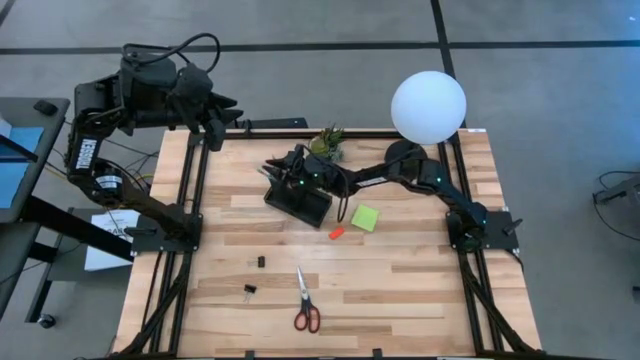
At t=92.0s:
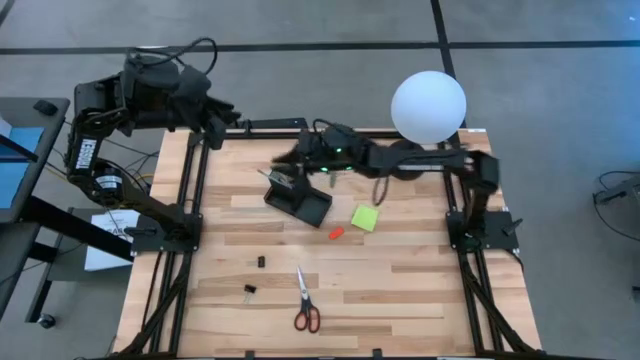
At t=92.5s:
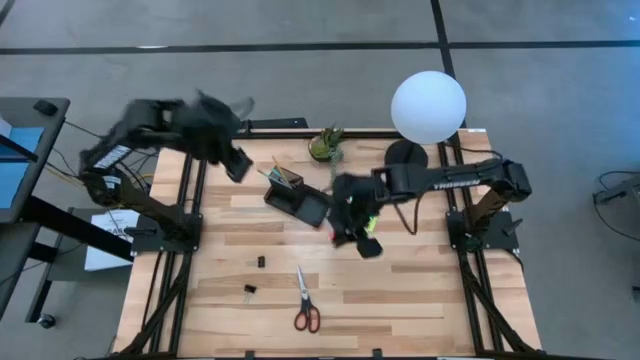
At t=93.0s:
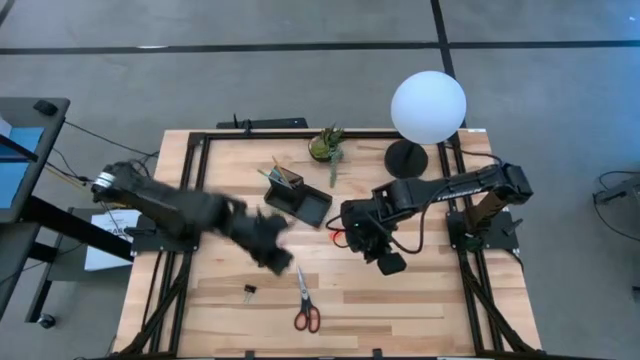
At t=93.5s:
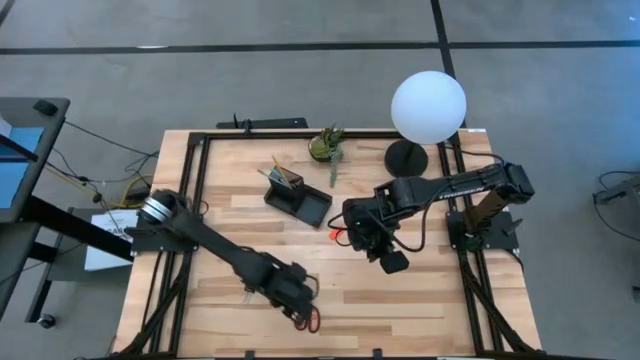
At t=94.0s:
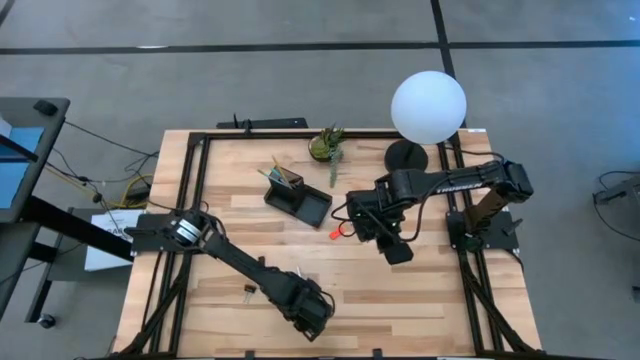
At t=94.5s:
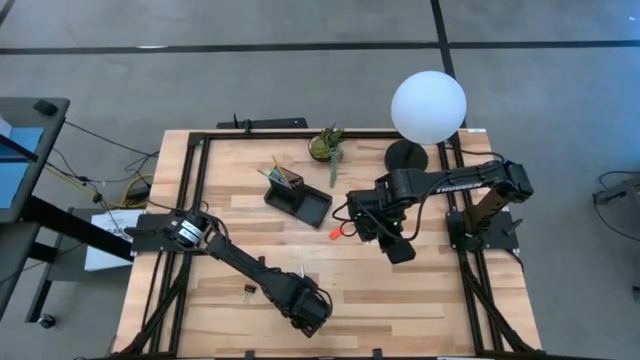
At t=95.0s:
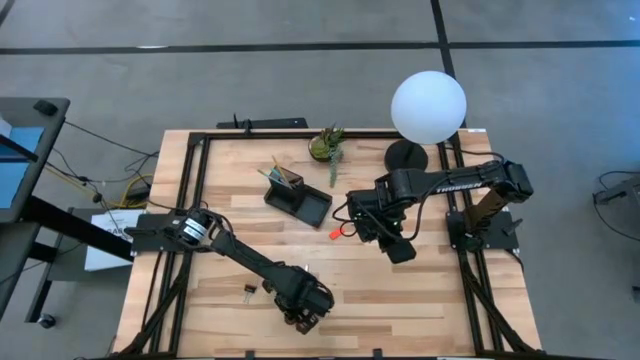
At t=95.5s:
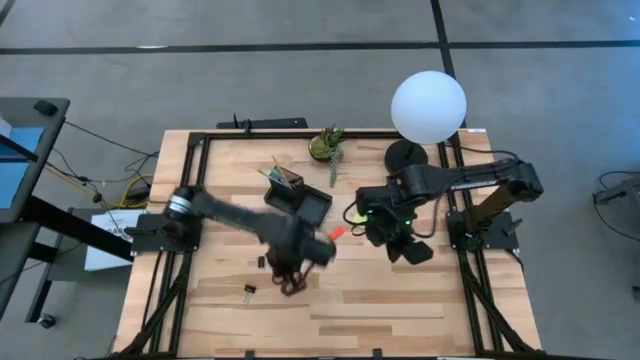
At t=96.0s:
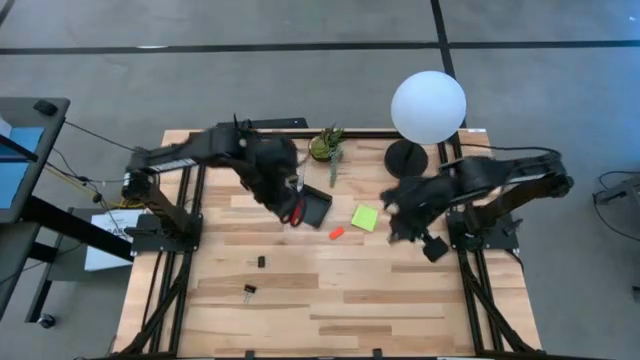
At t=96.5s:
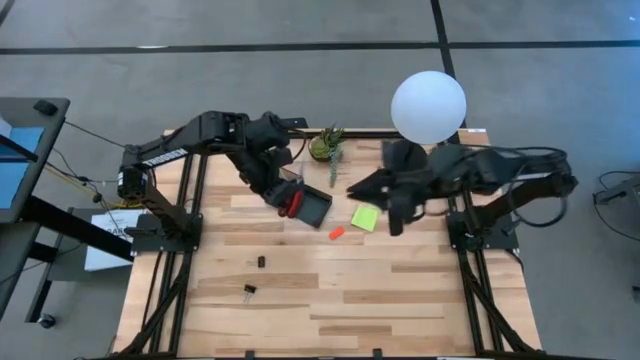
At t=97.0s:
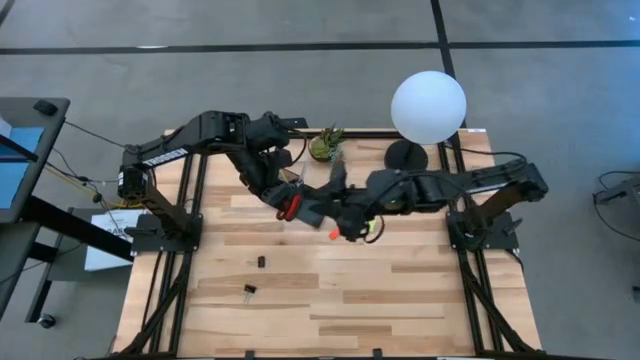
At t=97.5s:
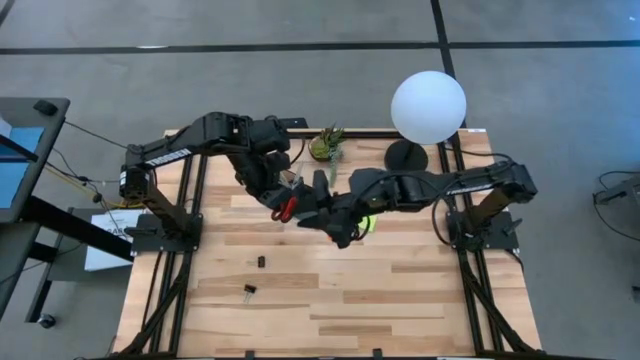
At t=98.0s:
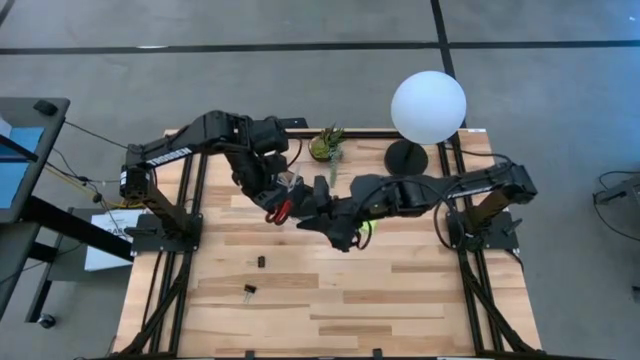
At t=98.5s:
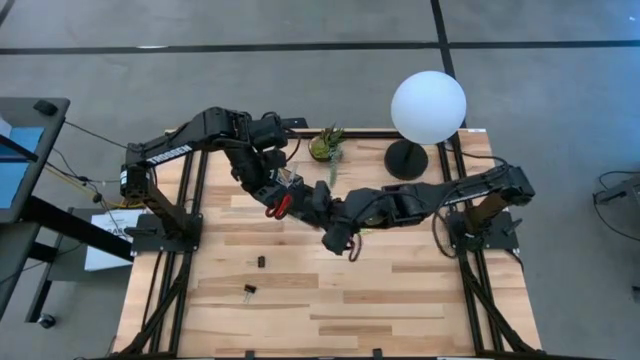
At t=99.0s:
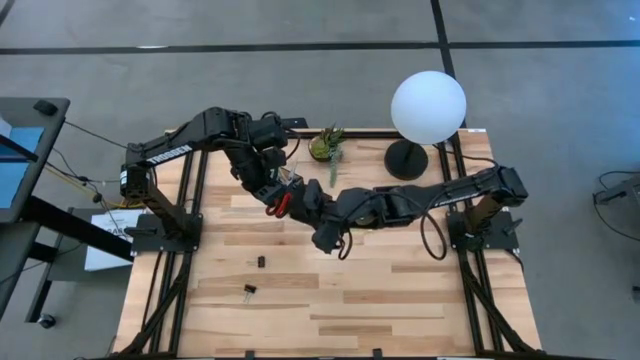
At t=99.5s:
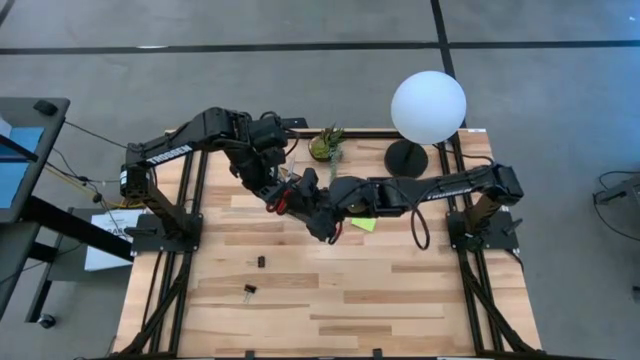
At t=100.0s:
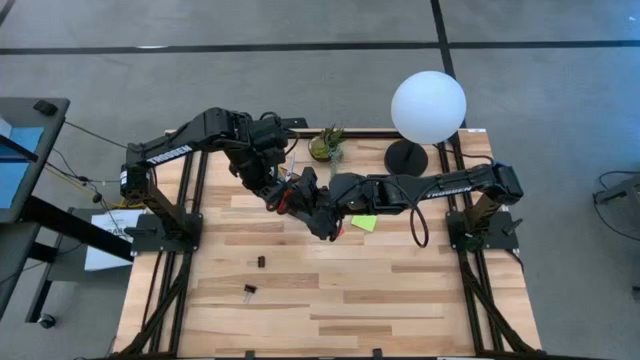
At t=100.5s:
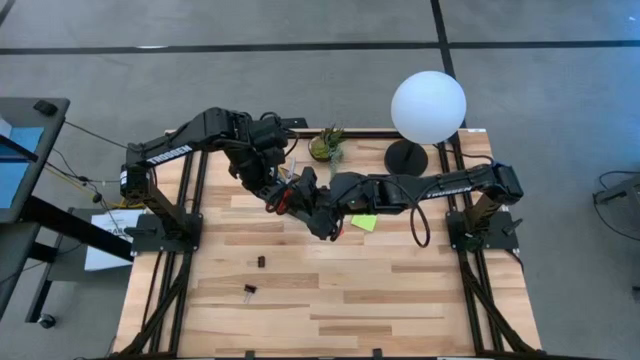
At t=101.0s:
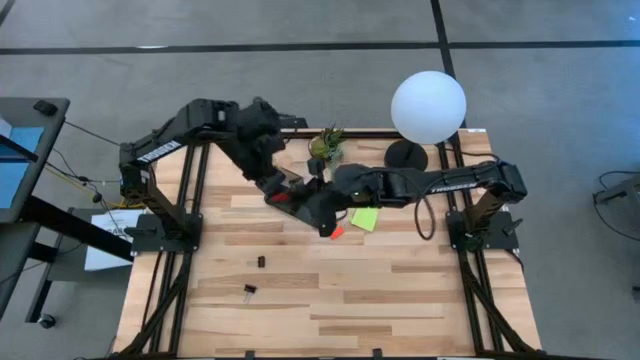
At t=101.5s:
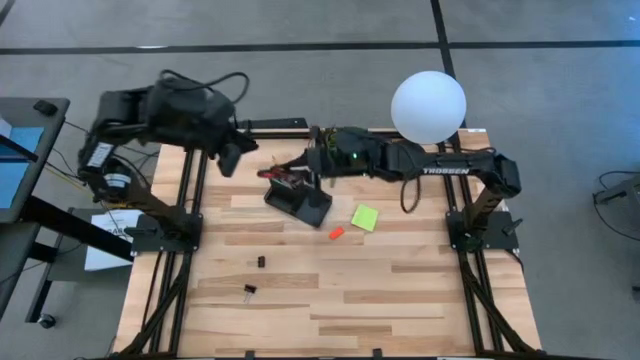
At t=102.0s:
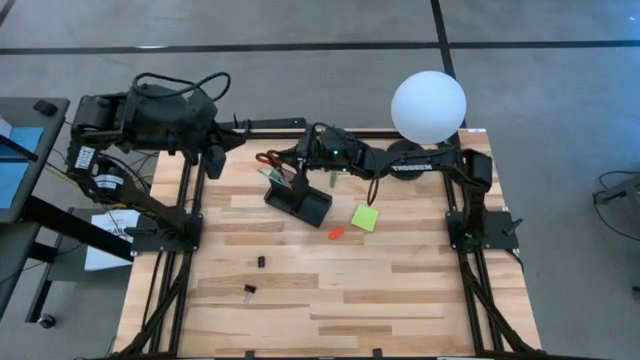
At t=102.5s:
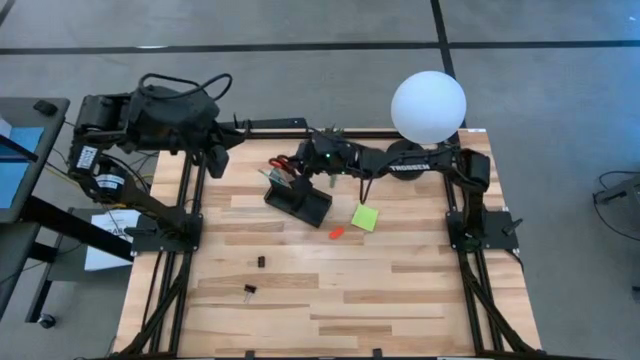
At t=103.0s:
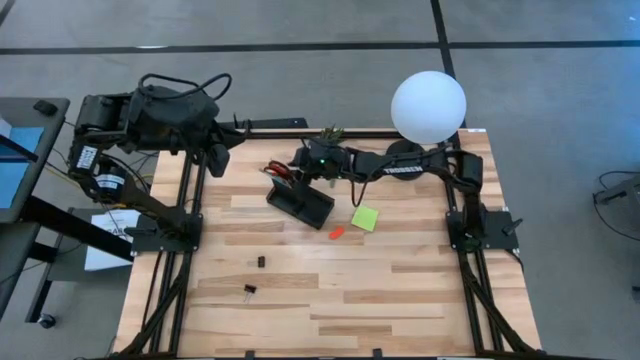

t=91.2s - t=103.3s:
Task: Pick and place office supplies into organizer
Put the scissors into the black desk organizer

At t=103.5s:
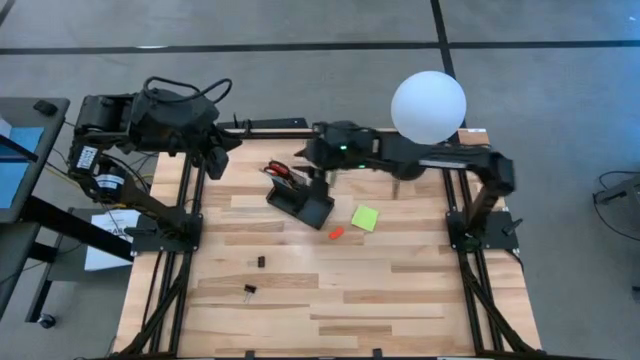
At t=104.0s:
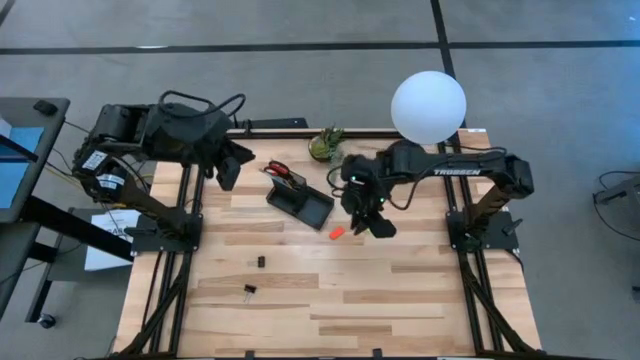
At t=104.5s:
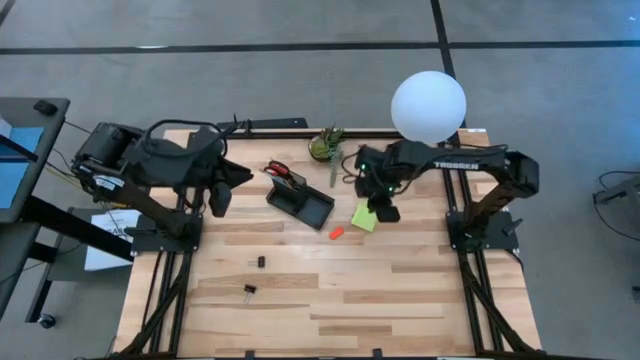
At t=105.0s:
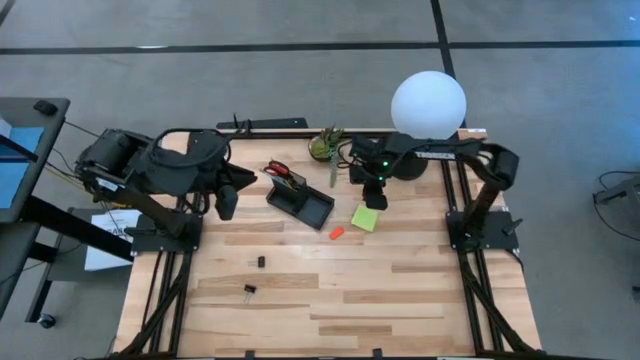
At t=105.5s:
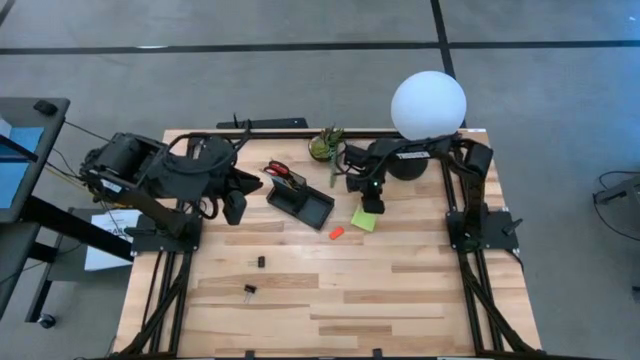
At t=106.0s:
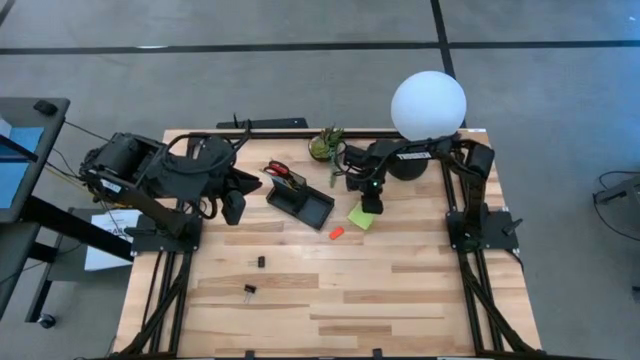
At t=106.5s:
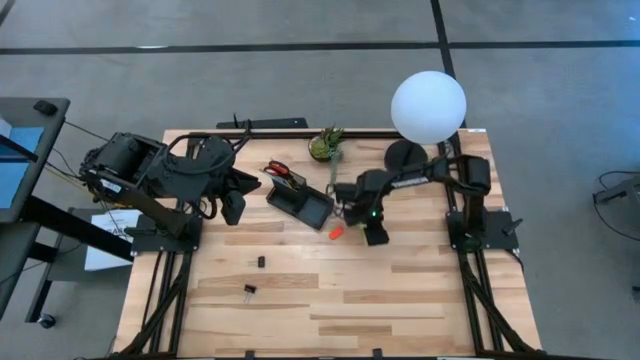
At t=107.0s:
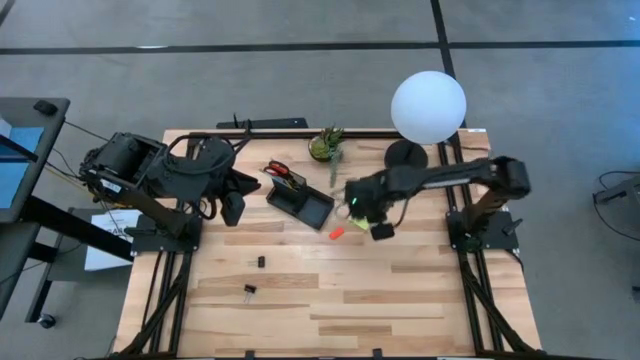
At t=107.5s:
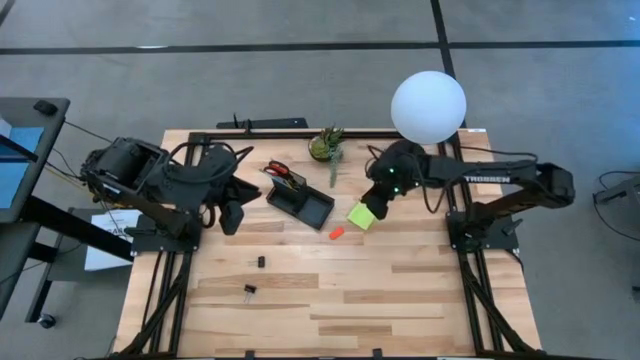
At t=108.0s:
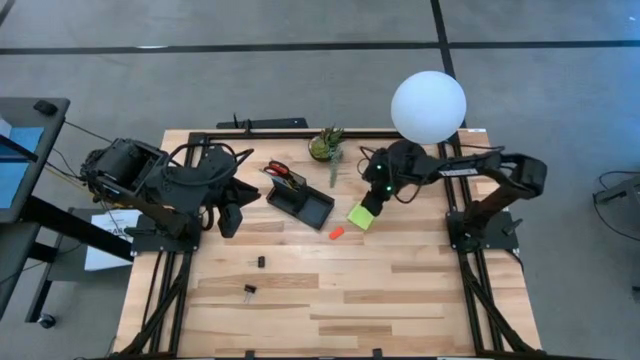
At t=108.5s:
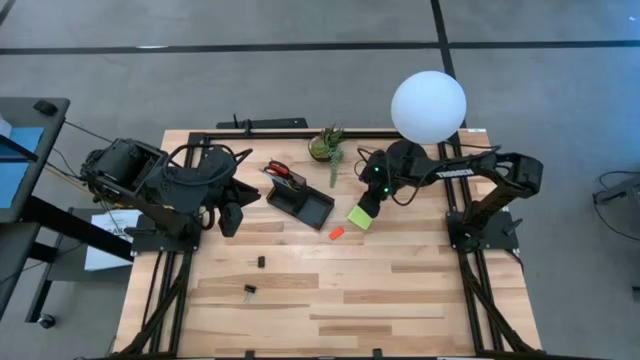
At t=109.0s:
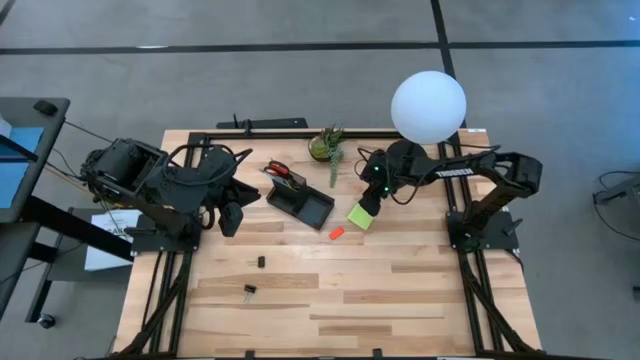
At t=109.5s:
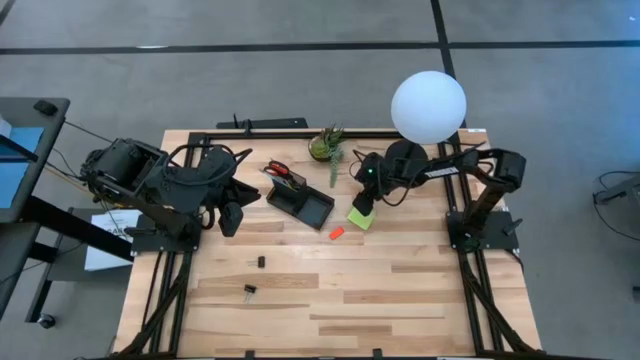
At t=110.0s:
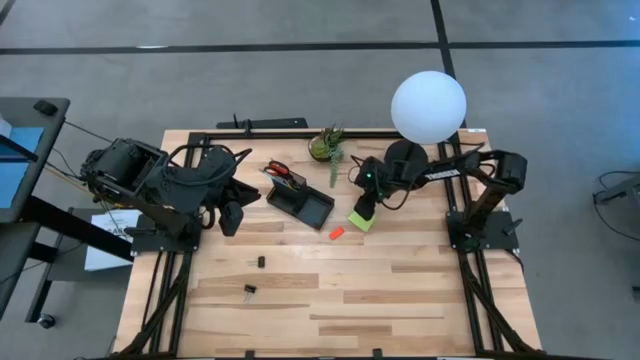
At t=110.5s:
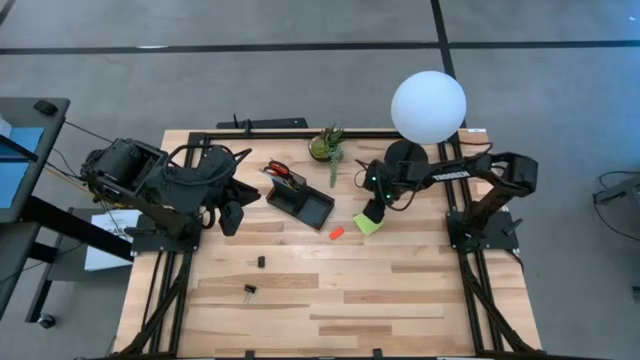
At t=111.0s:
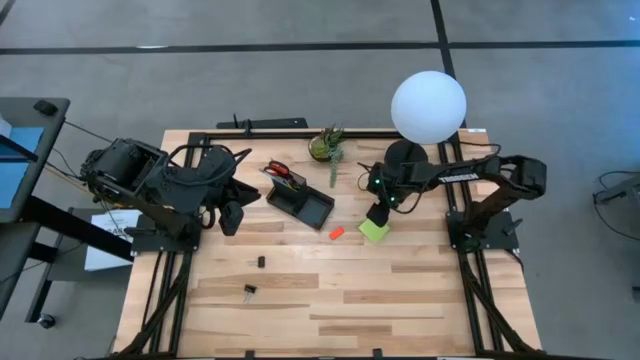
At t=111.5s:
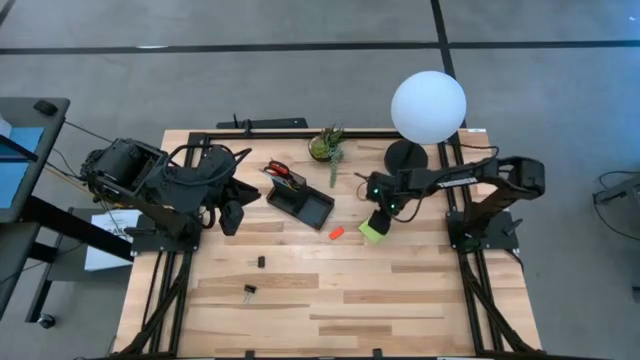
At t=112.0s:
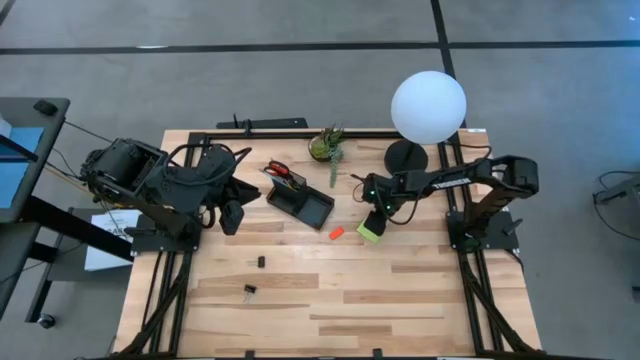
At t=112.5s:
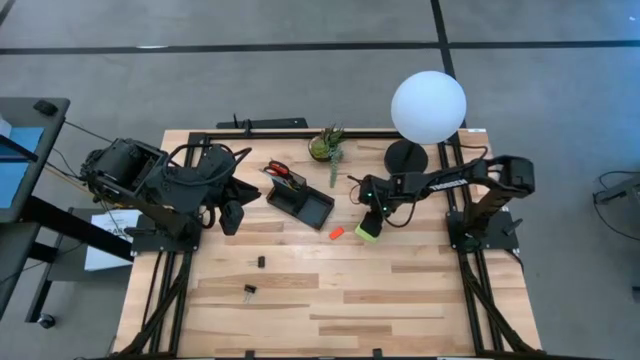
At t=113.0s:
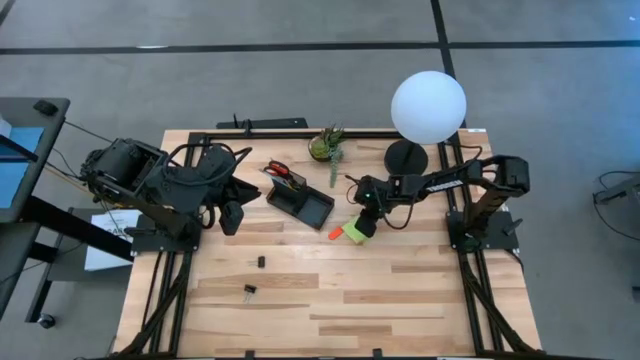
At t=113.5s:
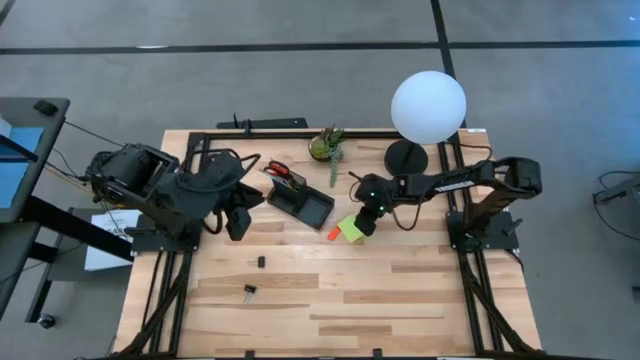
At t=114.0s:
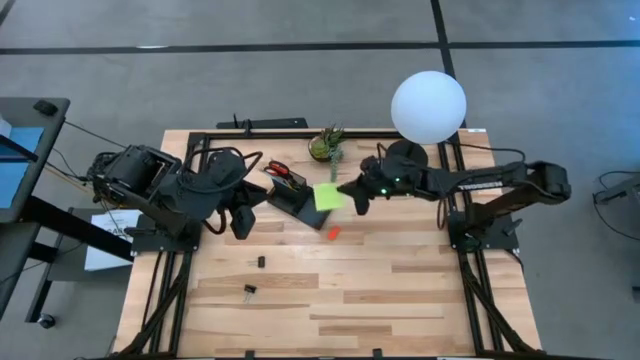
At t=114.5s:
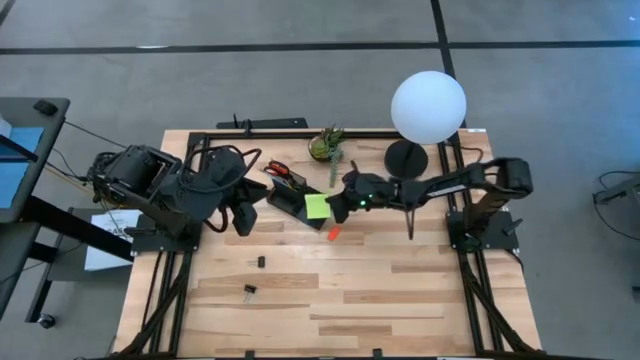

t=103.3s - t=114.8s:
Put the green sticky note into the black desk organizer
